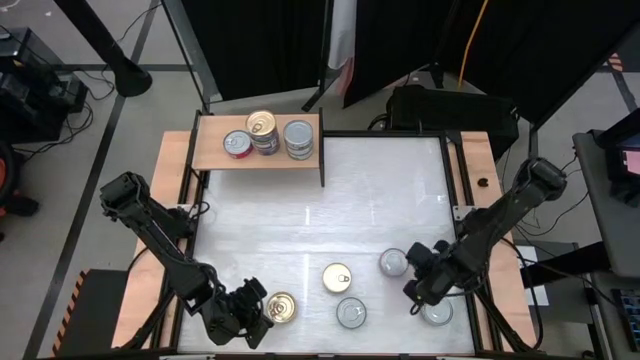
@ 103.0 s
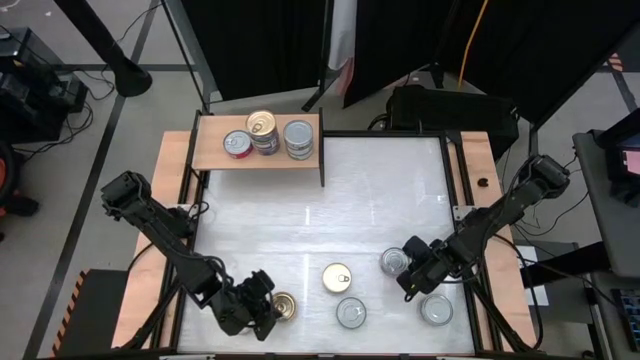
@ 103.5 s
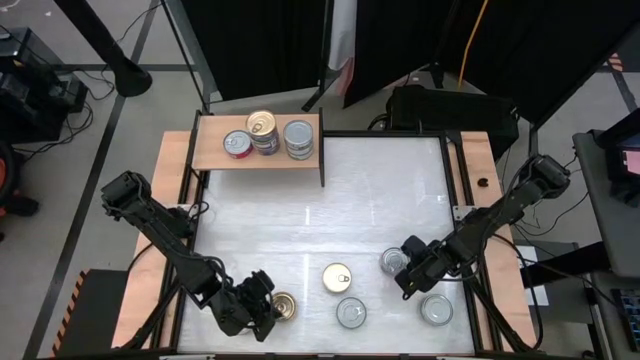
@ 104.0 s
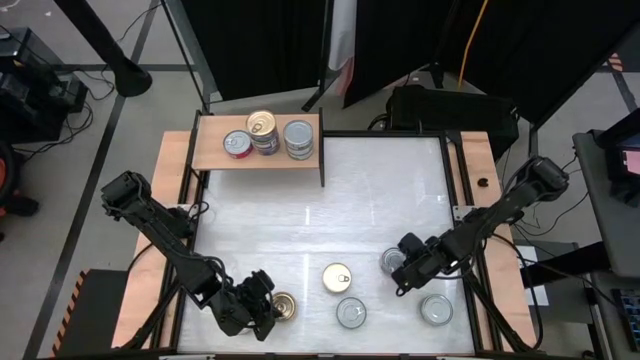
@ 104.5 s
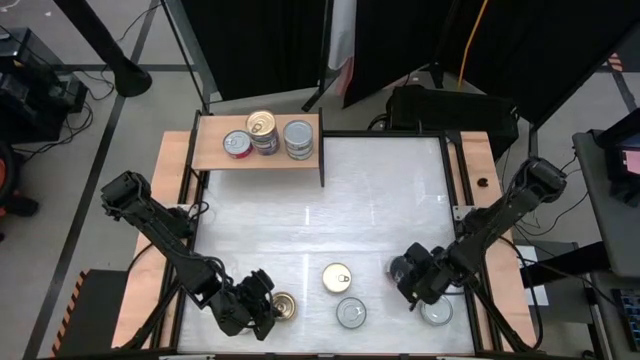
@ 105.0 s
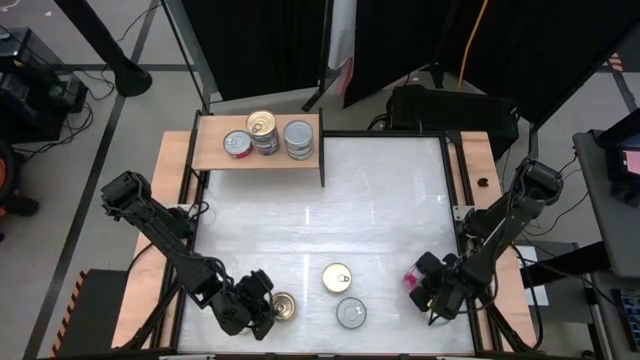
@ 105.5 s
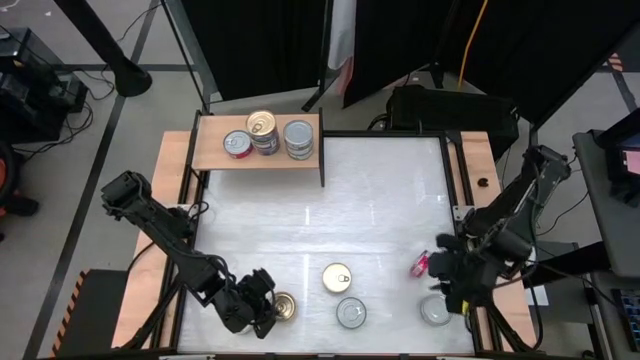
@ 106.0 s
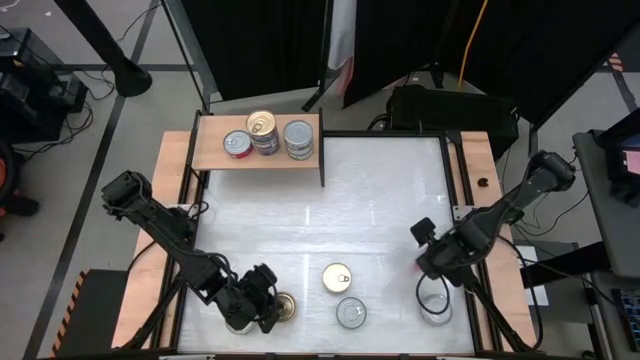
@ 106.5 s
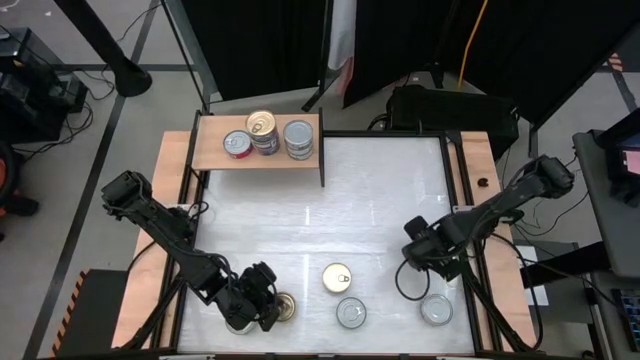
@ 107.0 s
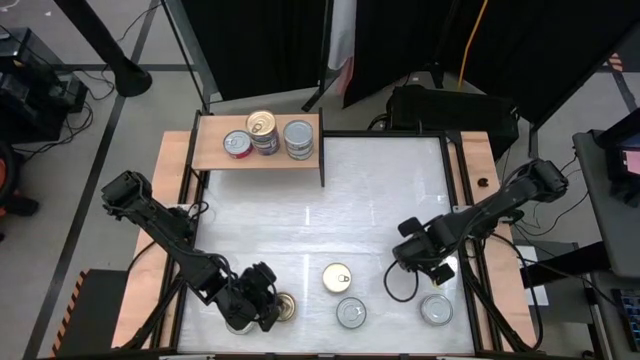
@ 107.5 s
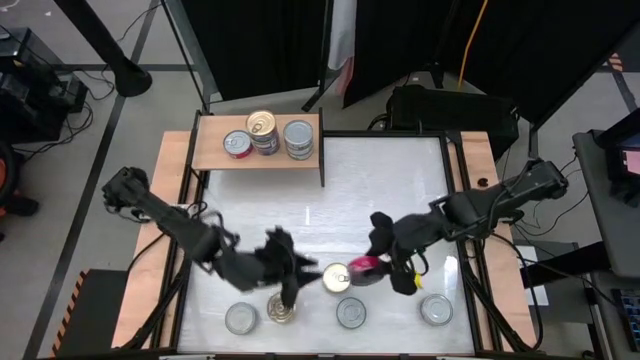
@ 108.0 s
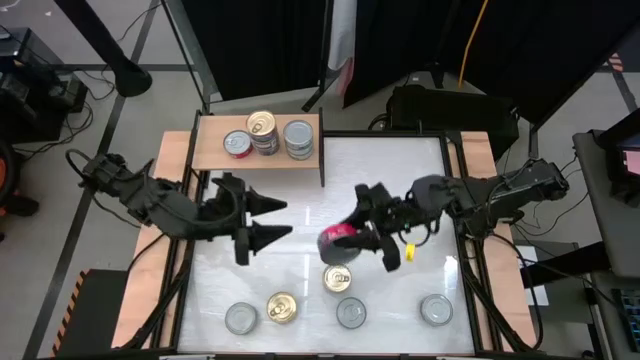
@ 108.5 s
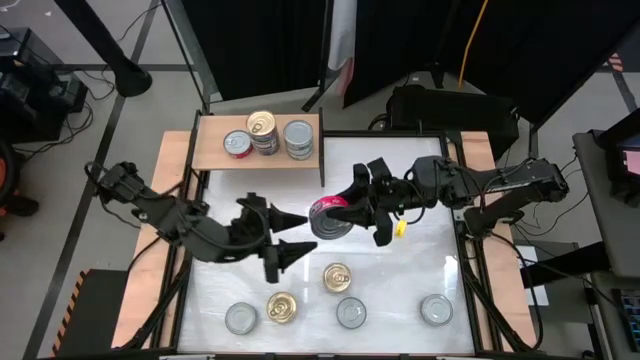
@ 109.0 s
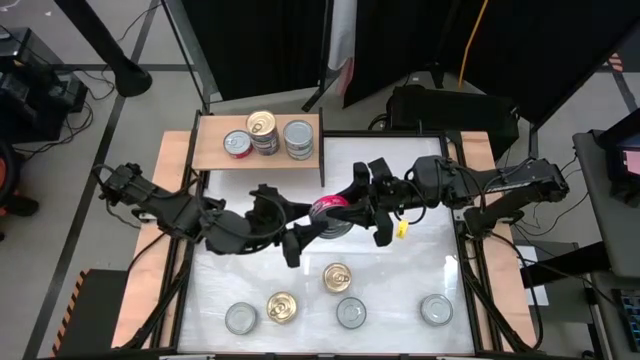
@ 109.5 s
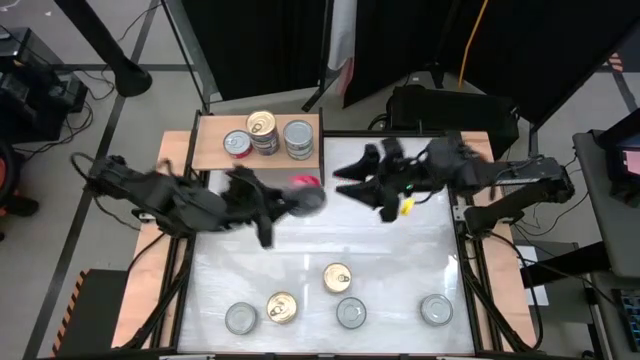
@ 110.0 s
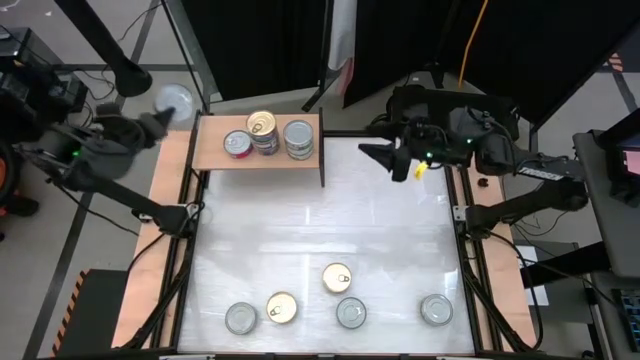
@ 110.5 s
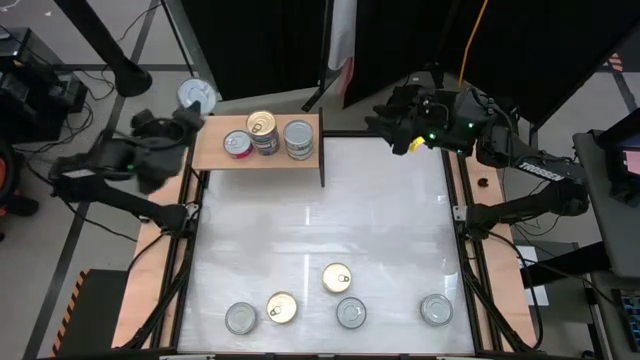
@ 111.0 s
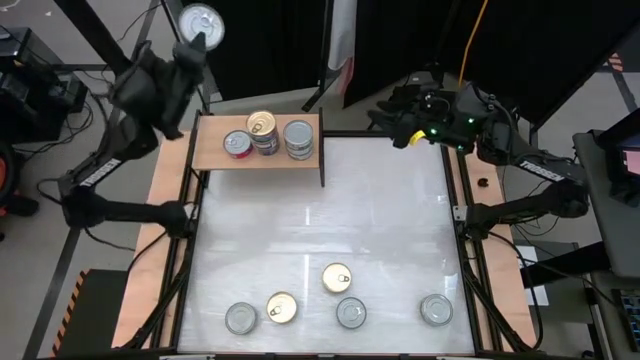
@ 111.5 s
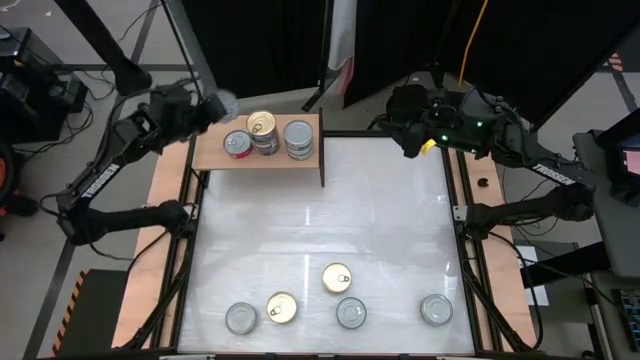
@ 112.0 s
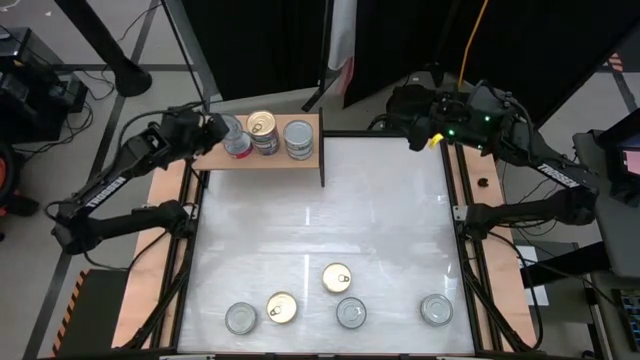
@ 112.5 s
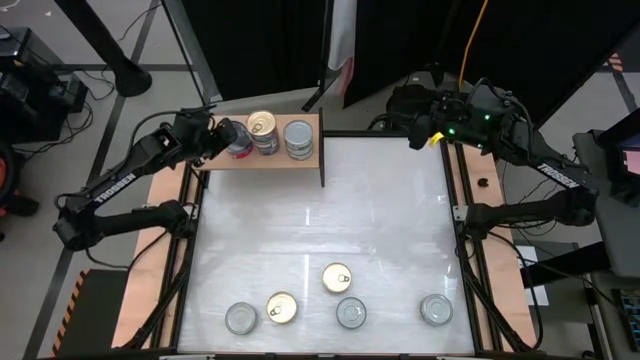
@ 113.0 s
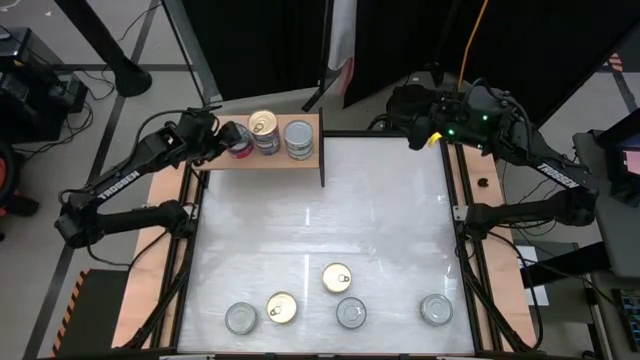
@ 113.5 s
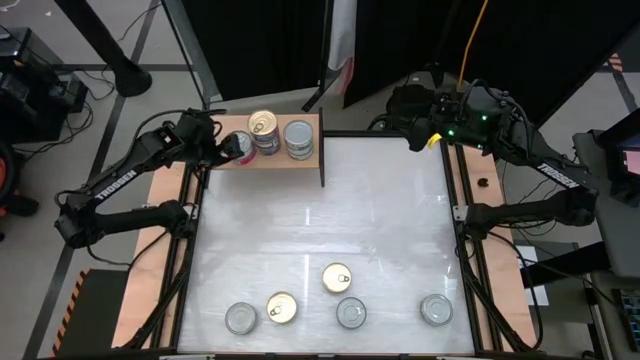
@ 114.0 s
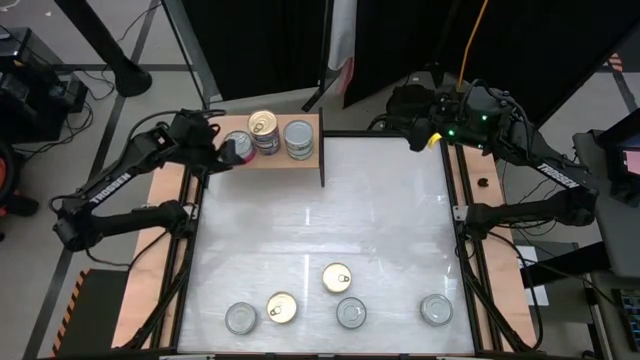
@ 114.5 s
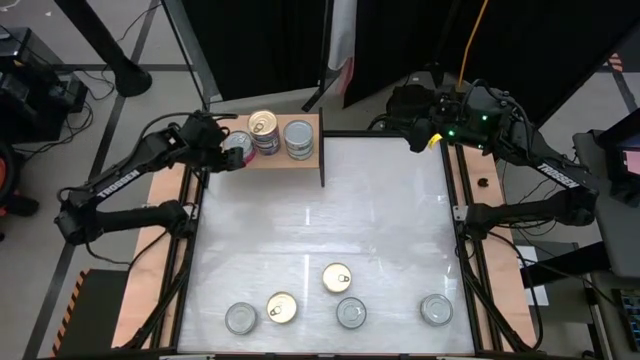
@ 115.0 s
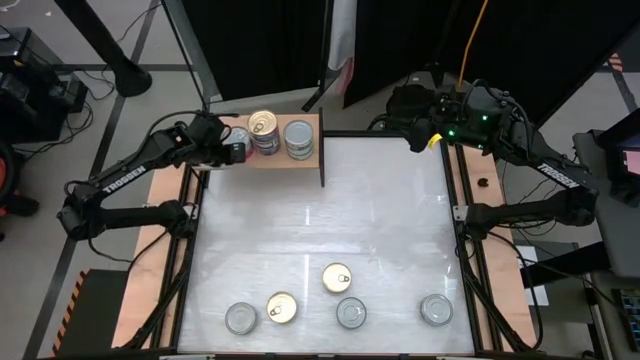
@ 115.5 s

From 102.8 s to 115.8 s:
Task: Stack canned seafood by type on shelf
Stack the red tuna can on top of the red tuna can on the shelf

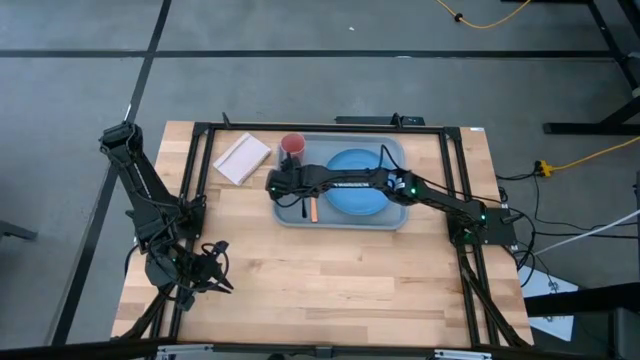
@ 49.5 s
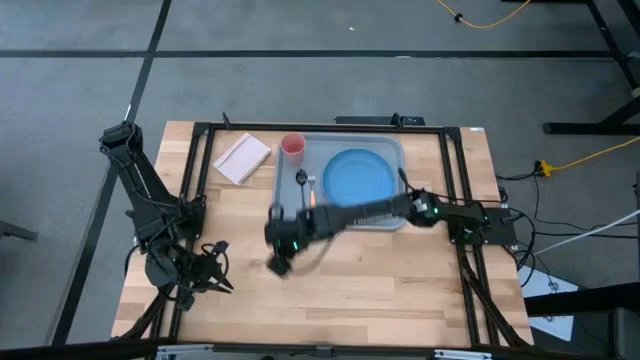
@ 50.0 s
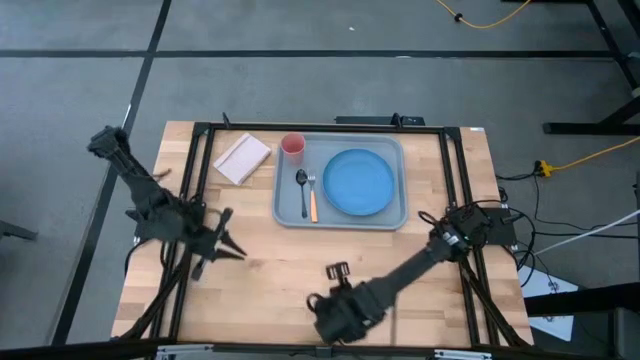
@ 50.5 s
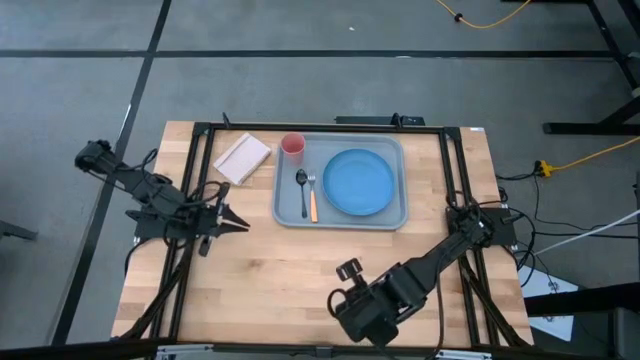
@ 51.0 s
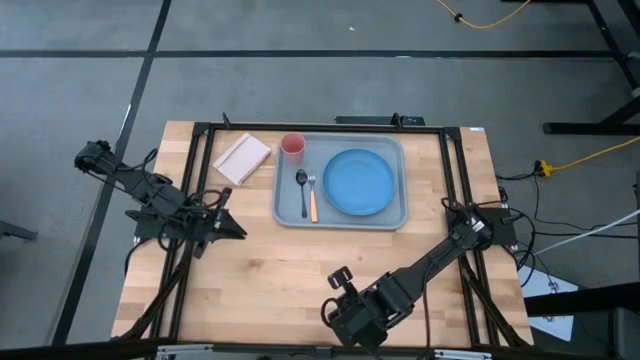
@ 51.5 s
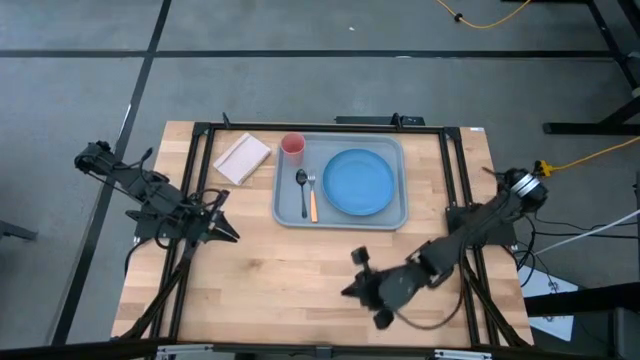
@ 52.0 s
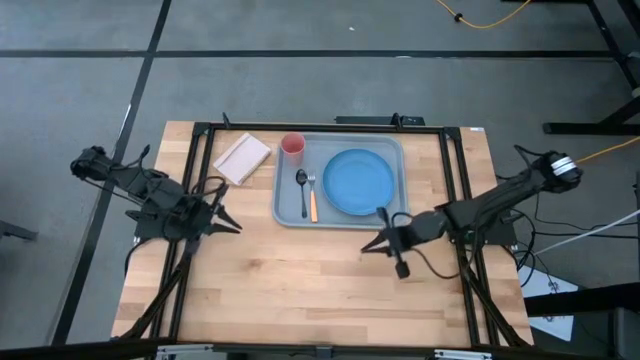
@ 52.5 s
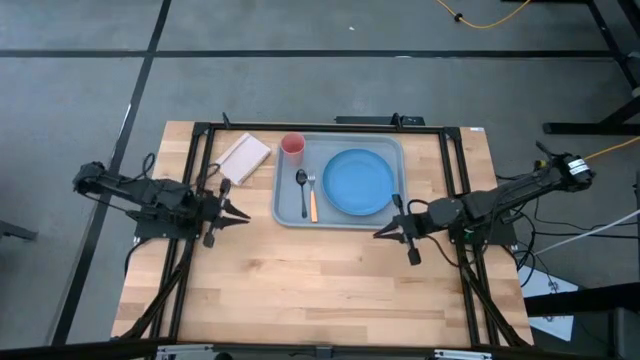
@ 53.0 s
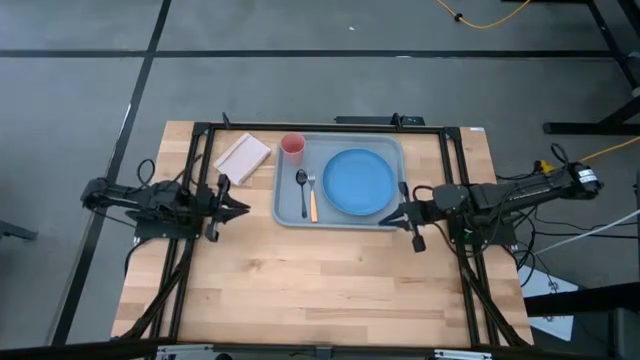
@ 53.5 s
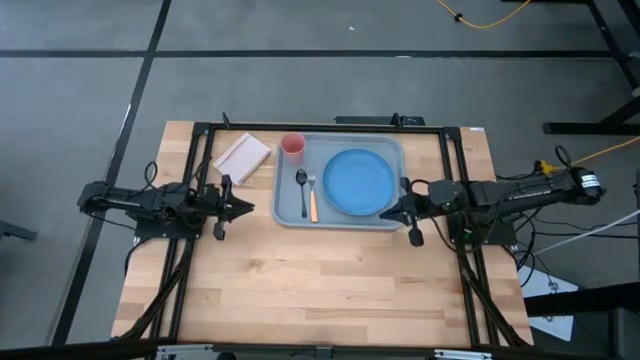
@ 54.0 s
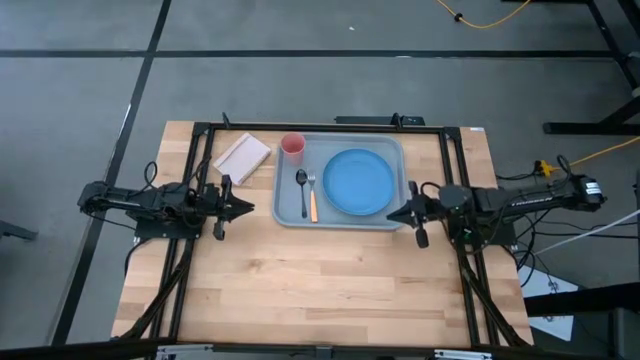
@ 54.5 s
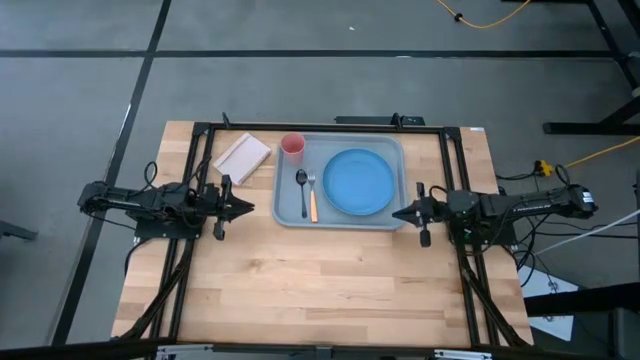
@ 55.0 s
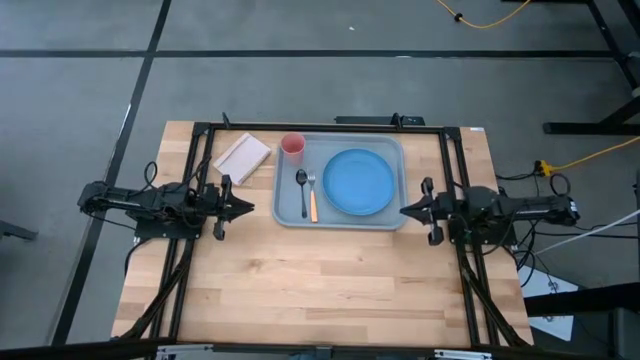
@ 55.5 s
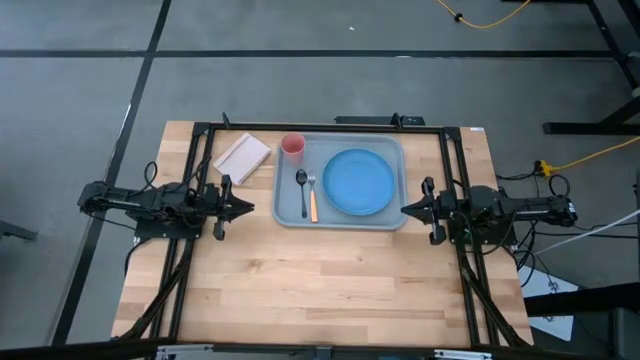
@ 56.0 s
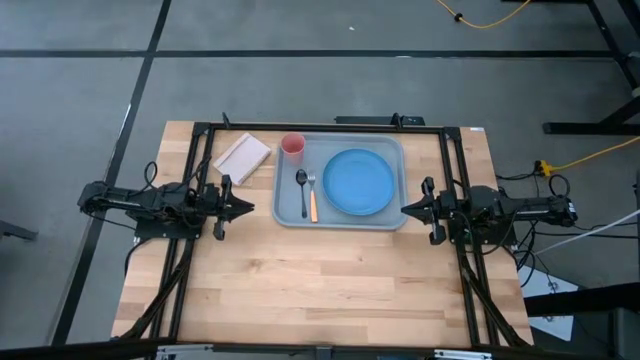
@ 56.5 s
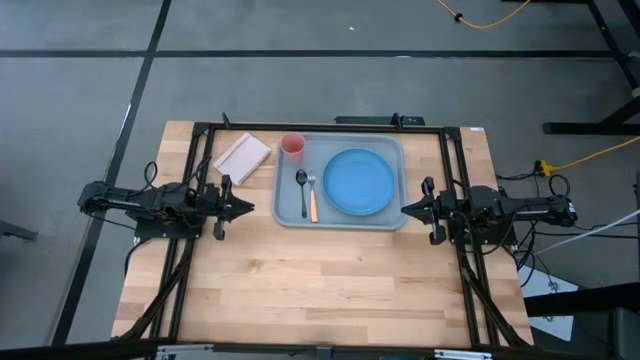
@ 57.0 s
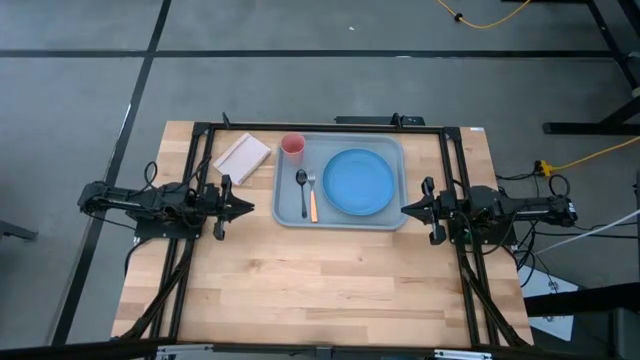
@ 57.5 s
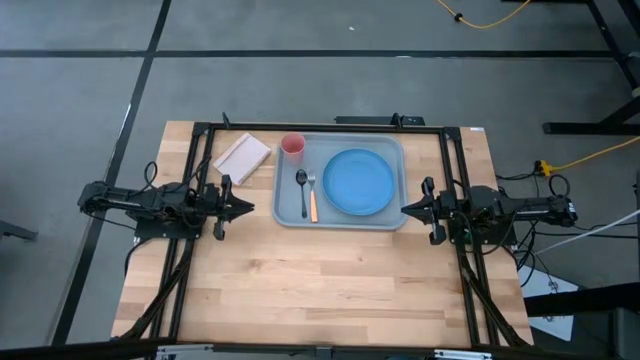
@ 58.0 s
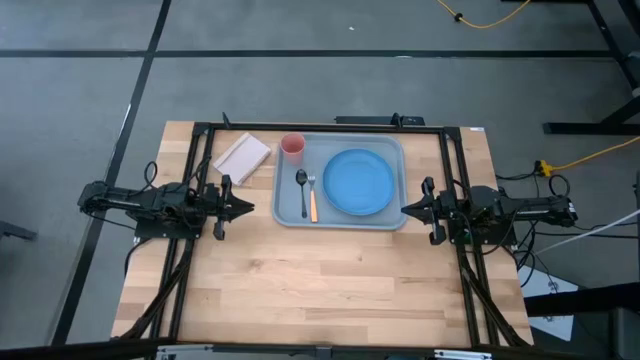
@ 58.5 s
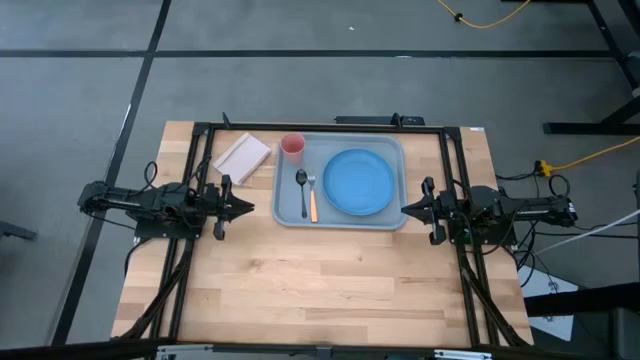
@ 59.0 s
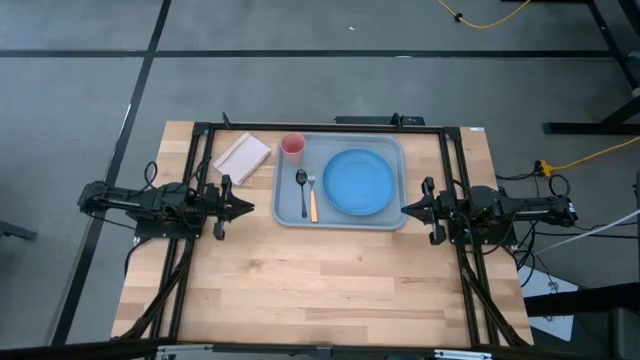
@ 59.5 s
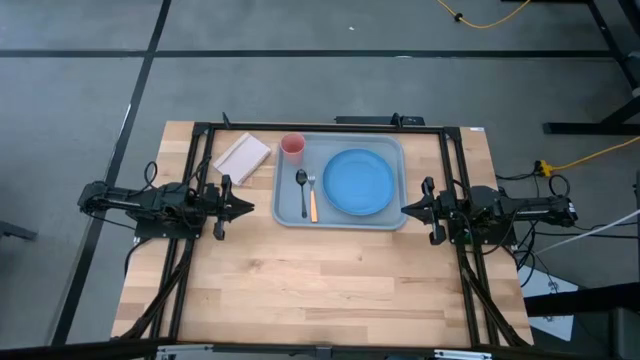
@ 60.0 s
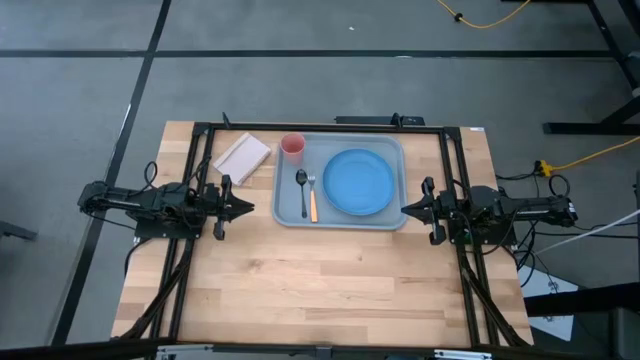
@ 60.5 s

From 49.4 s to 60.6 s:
Task: Pick and place plate/cup/fork/spoon on tray
Return to Home Position
